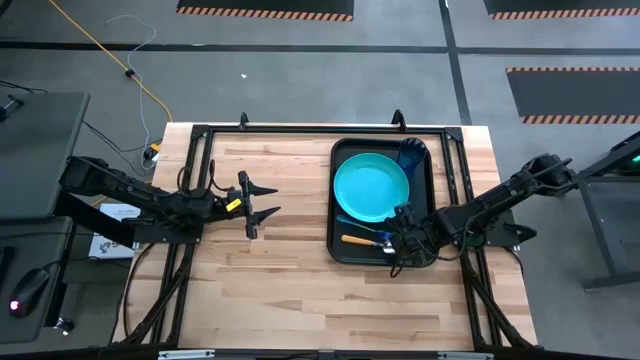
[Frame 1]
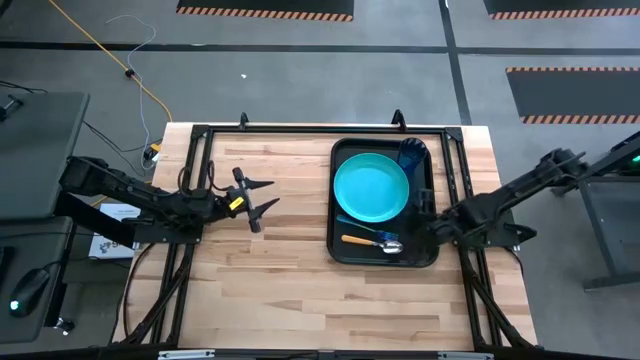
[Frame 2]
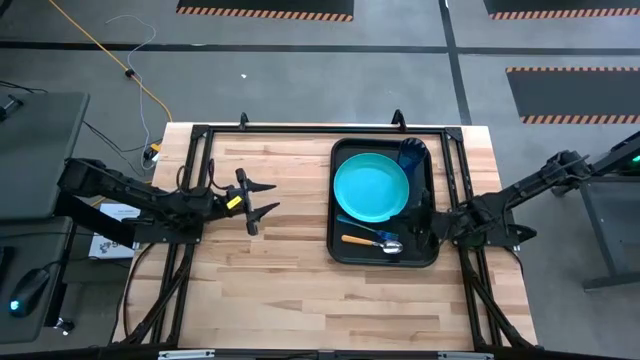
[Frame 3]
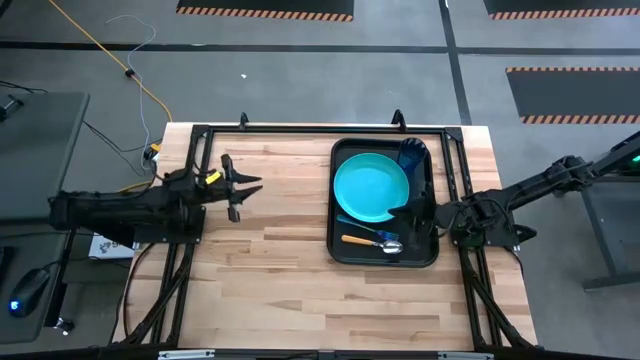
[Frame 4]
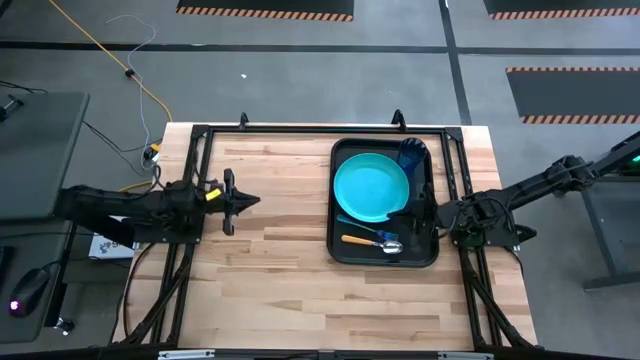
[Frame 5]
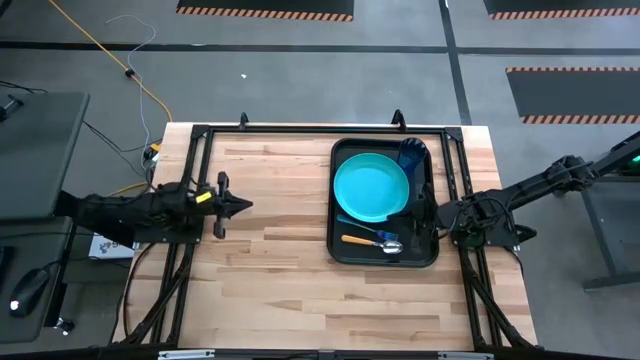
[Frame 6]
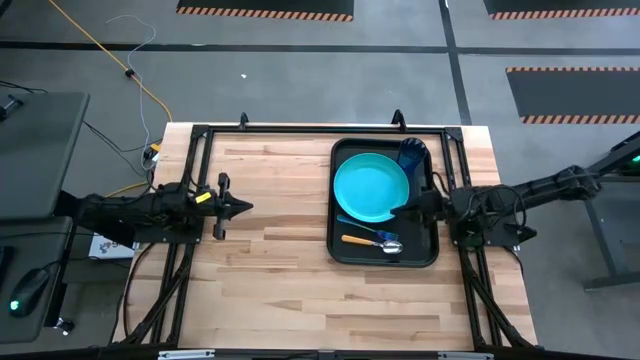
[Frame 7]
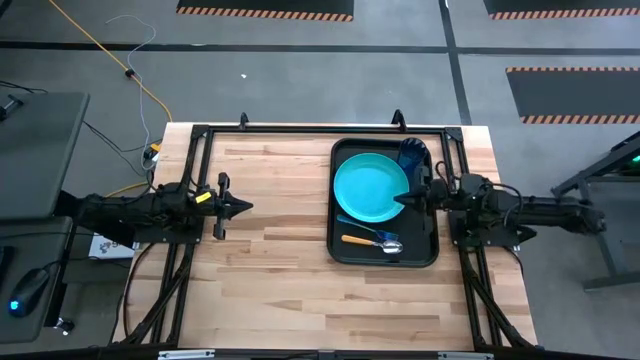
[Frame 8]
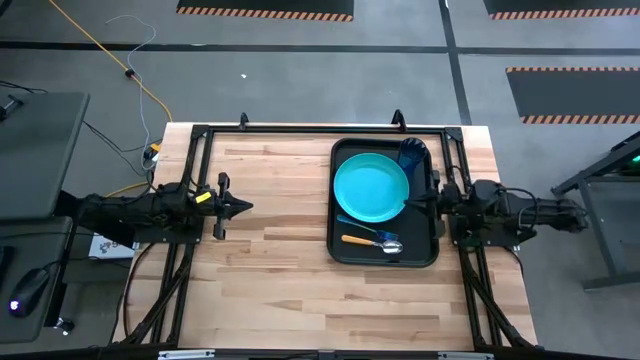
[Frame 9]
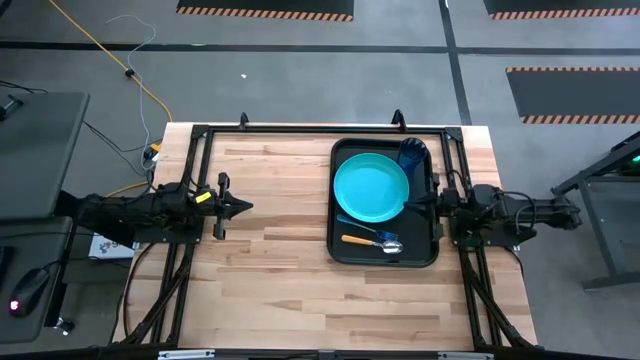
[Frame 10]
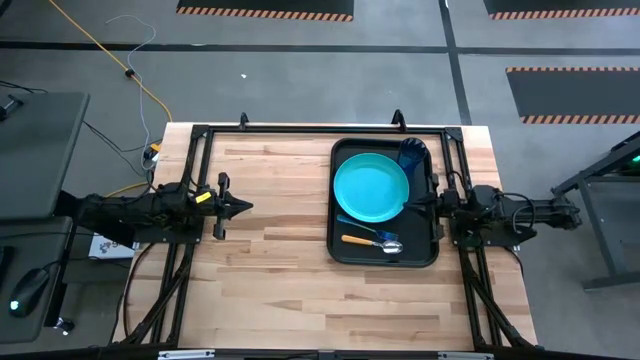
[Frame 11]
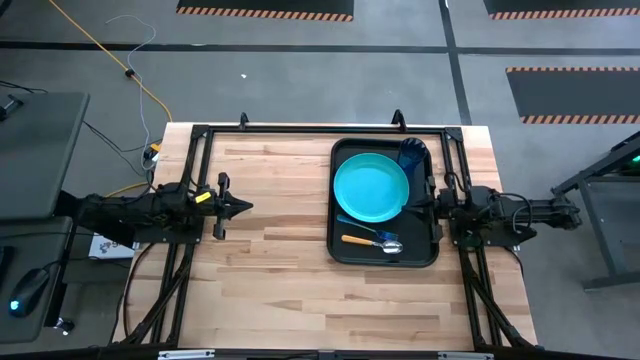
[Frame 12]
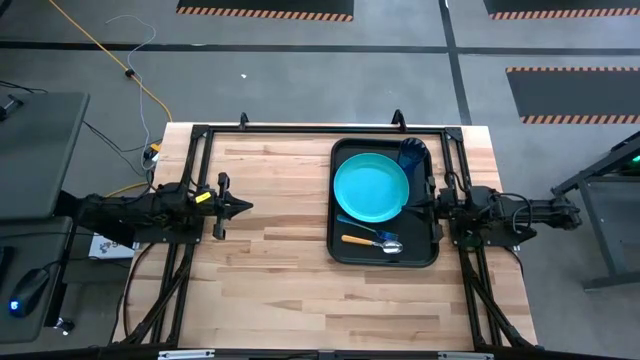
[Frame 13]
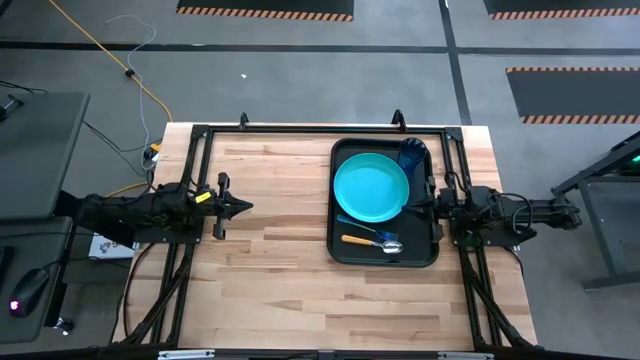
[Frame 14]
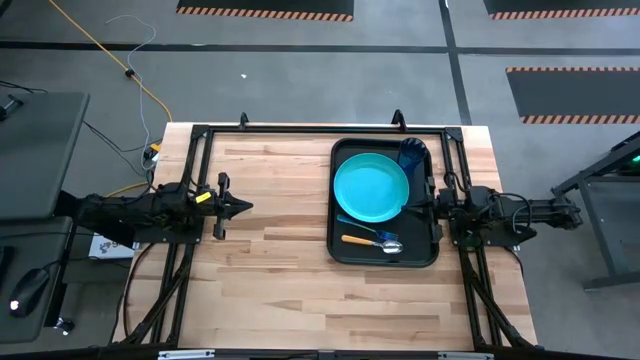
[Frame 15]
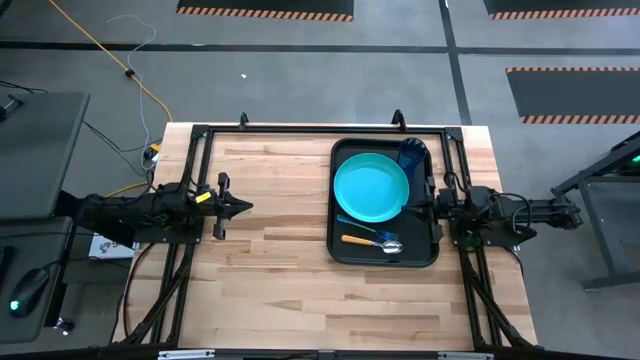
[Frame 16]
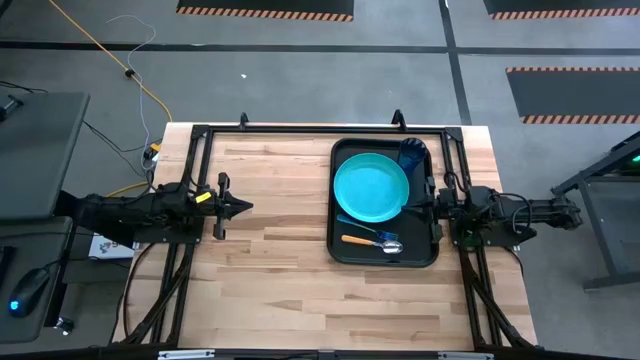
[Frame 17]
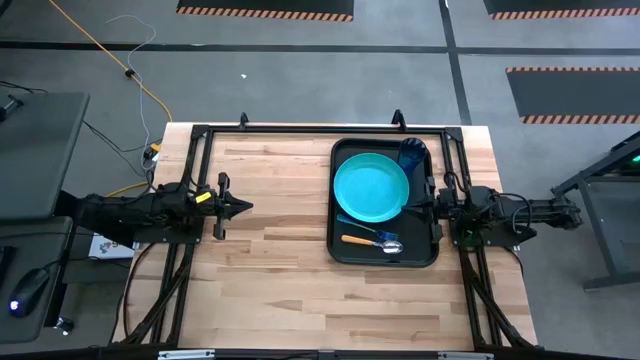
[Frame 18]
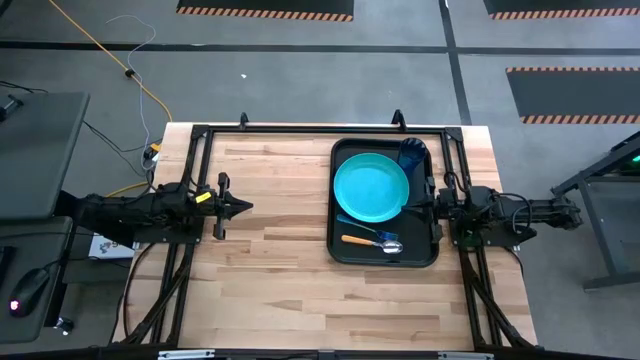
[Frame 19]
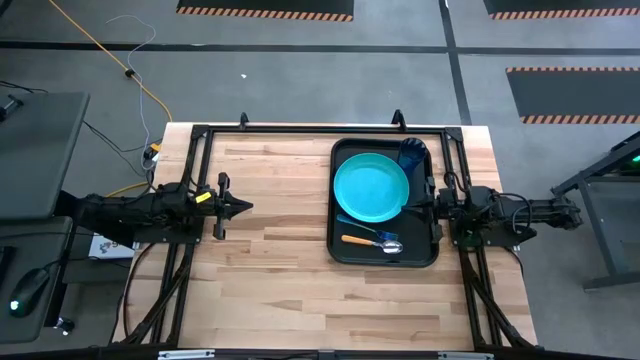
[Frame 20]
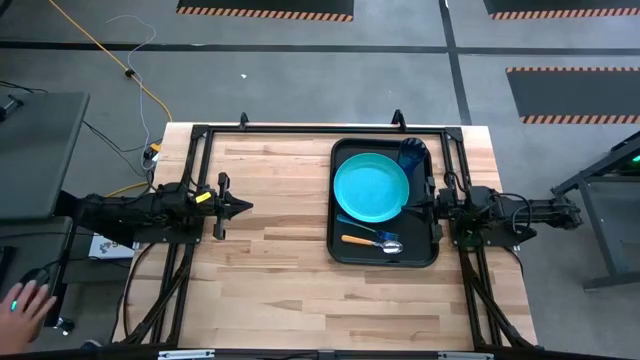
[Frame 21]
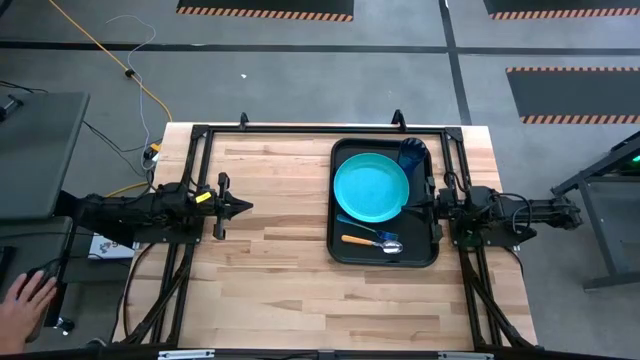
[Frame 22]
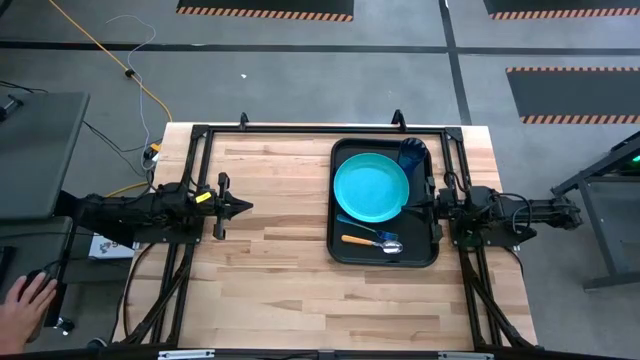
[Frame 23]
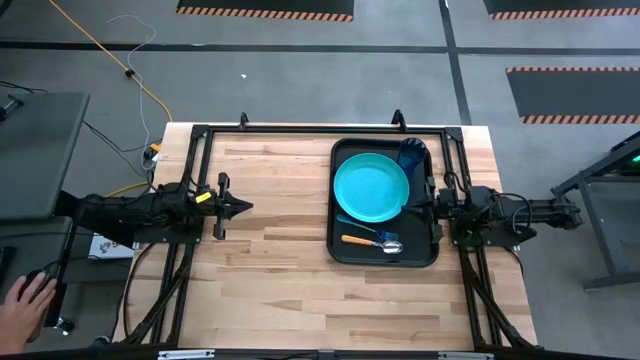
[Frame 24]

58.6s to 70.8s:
Task: Pick and place plate/cup/fork/spoon on tray
Return to Home Position

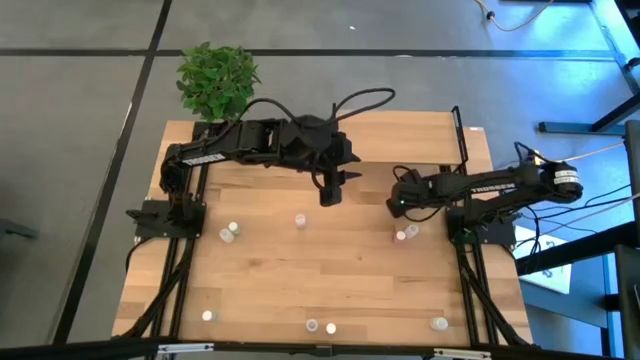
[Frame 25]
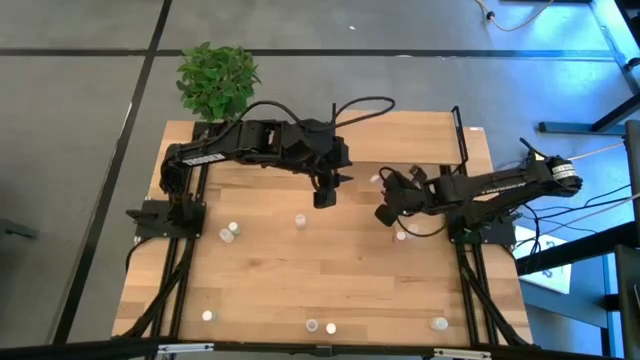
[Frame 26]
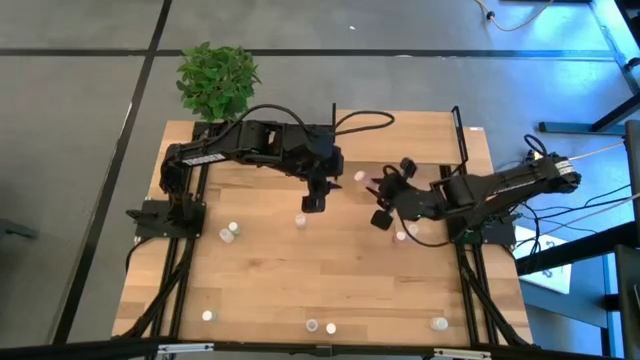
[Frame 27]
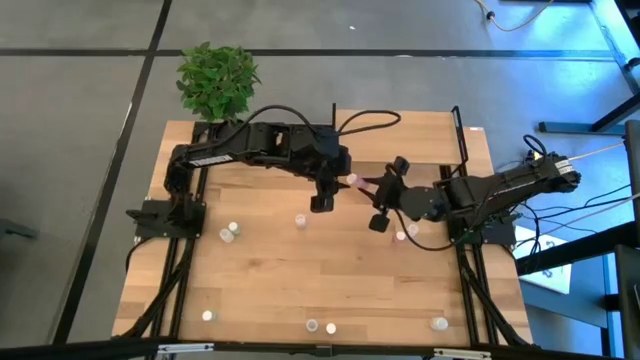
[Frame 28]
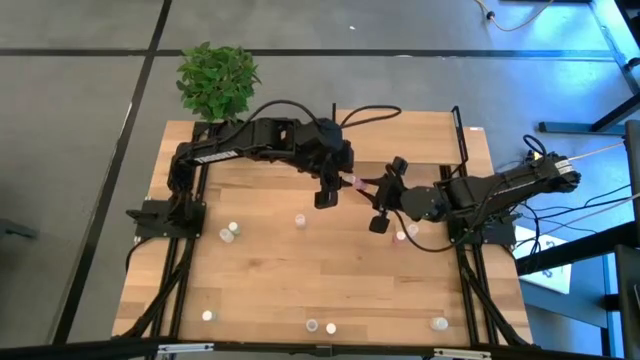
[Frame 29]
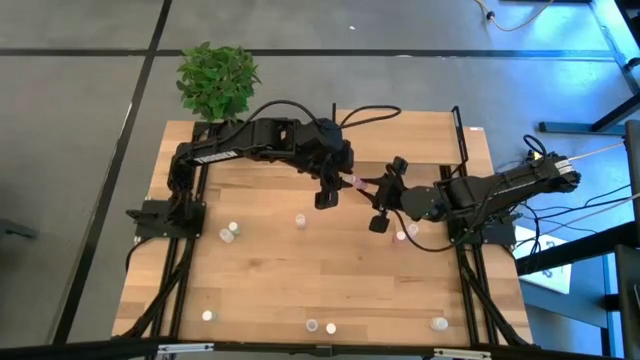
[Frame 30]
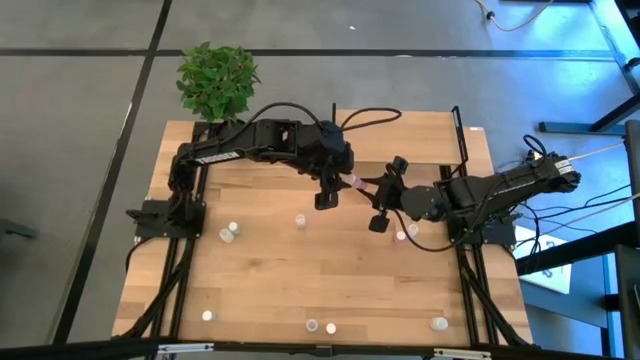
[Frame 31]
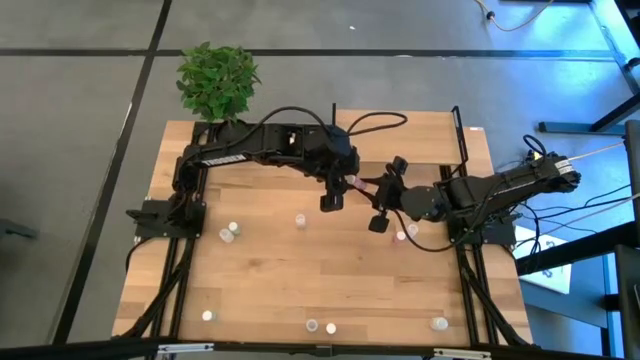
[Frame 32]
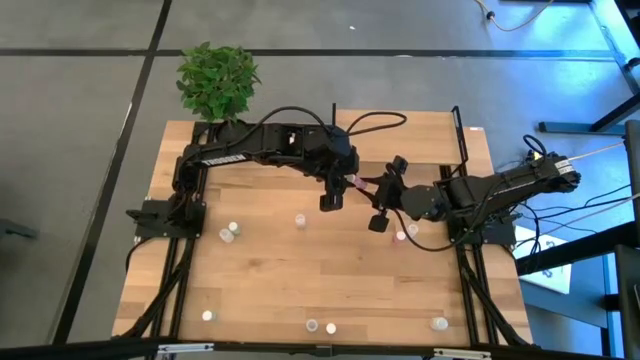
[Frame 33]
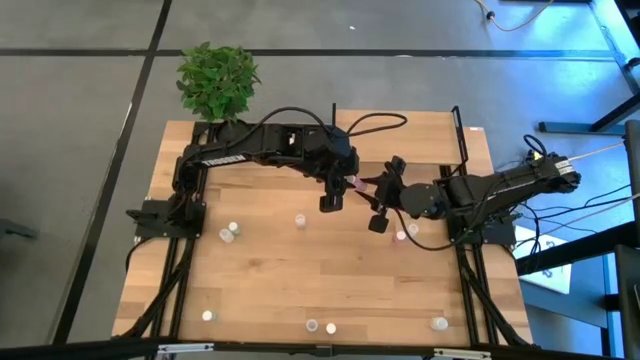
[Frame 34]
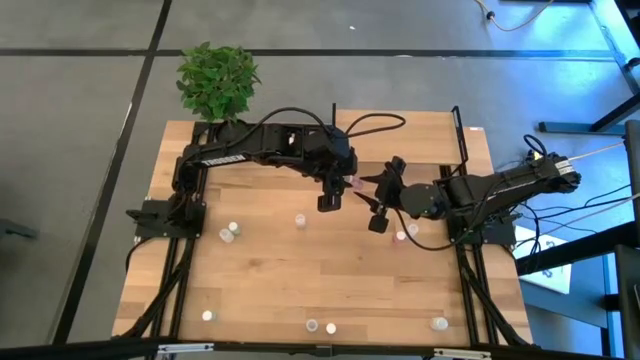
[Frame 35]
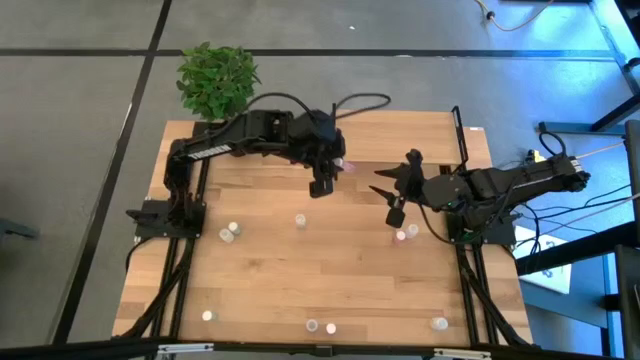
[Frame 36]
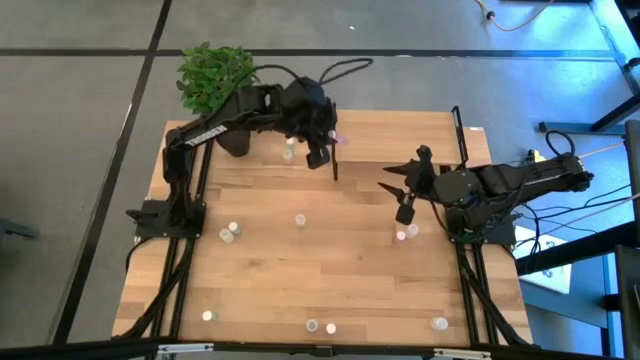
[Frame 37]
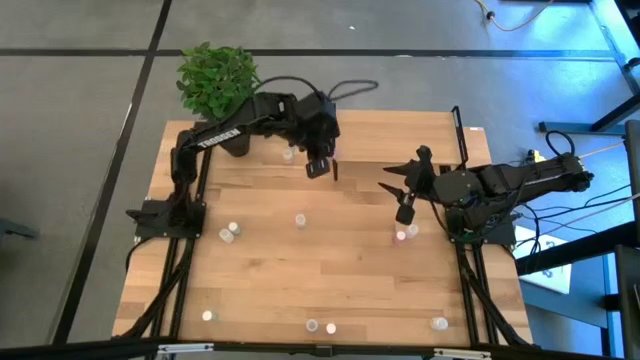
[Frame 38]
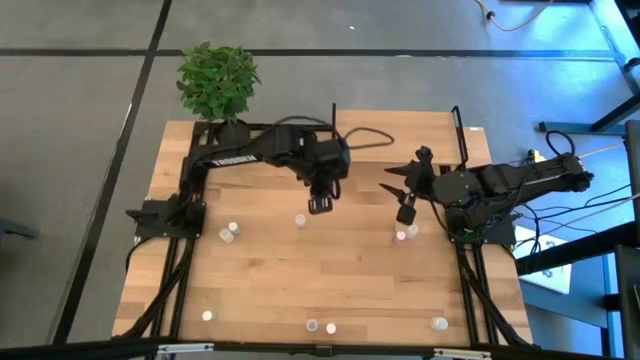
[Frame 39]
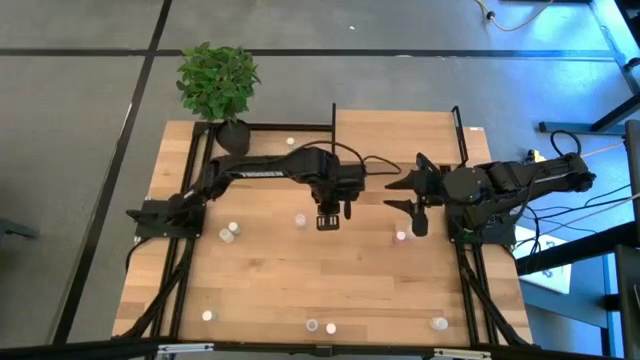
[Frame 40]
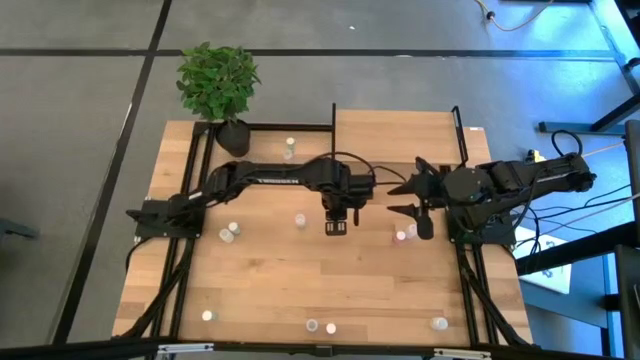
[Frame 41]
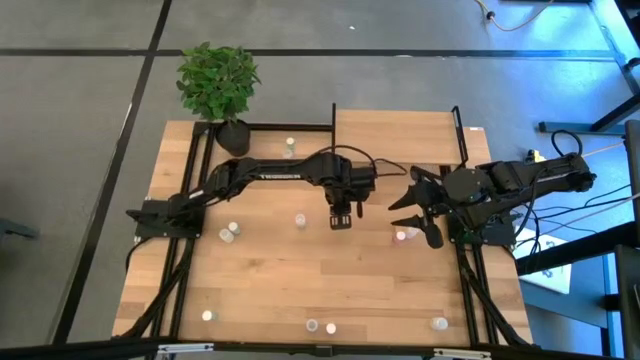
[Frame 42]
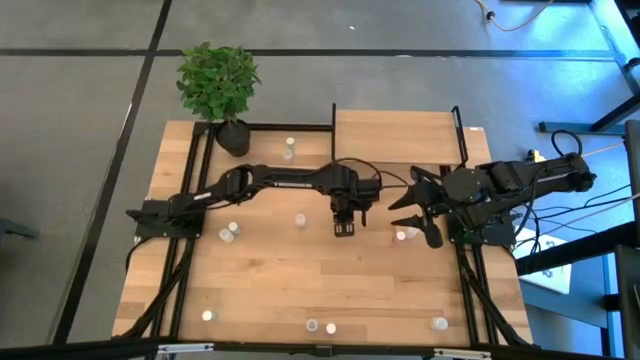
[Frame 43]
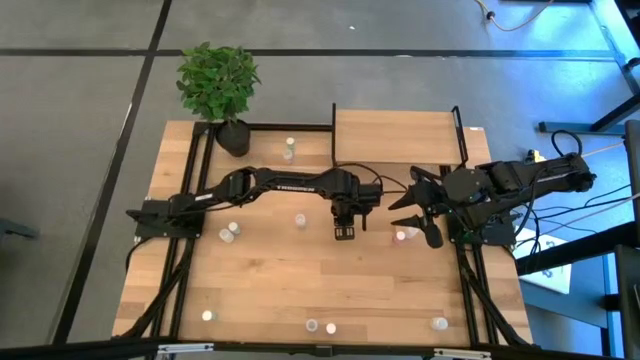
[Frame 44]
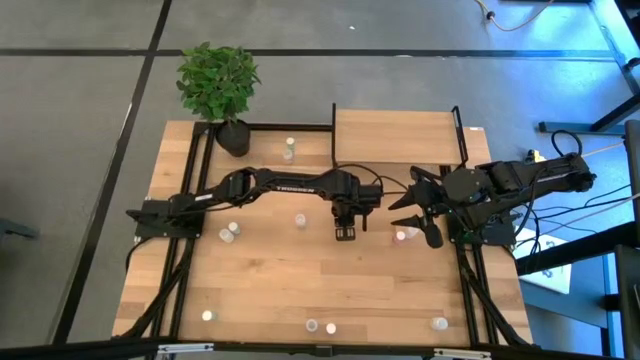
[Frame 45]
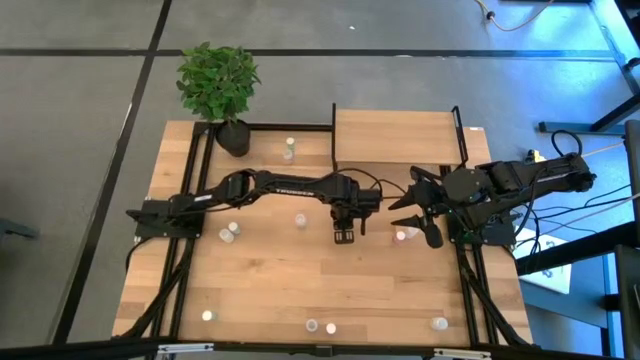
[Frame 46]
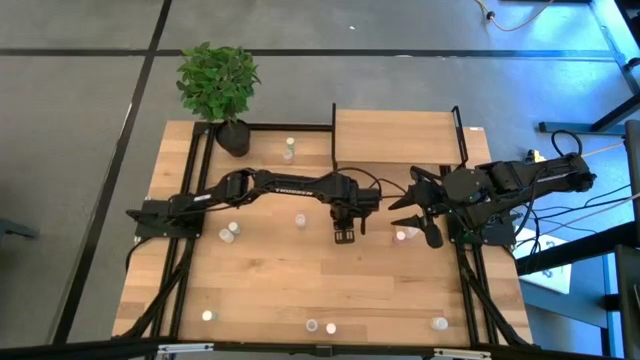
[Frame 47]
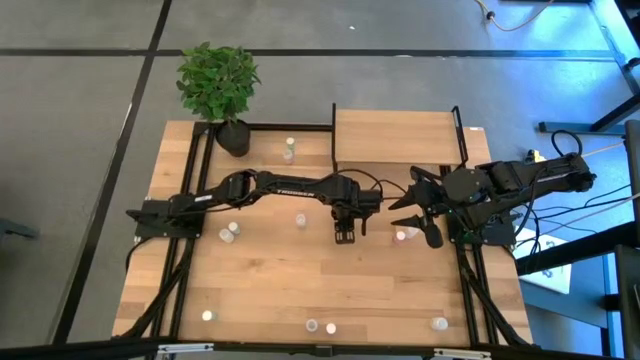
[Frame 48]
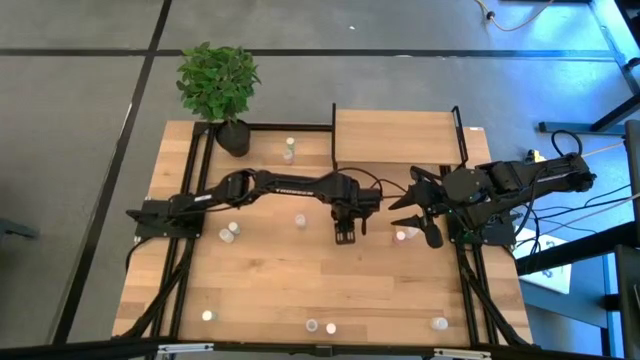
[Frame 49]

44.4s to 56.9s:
Task: Pick and place medicine bottles onto shelf by color
Move the top pink pill bottle to the center of the table
